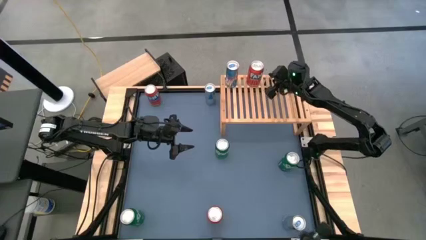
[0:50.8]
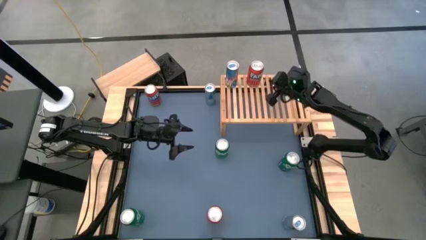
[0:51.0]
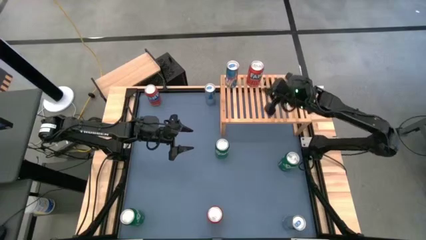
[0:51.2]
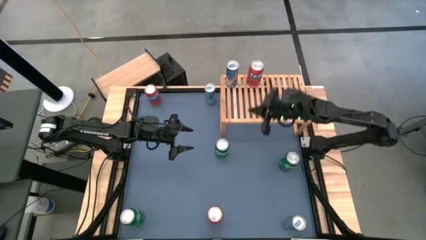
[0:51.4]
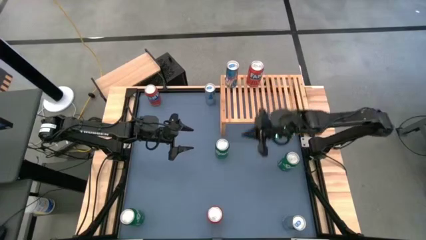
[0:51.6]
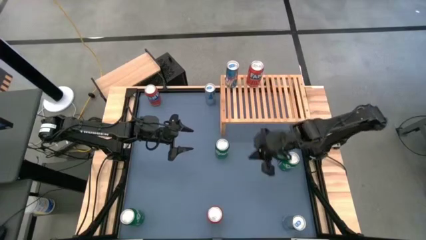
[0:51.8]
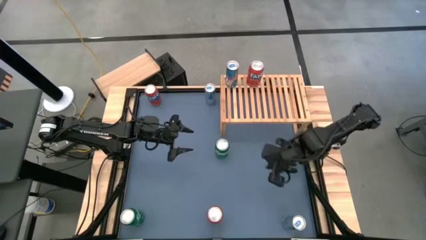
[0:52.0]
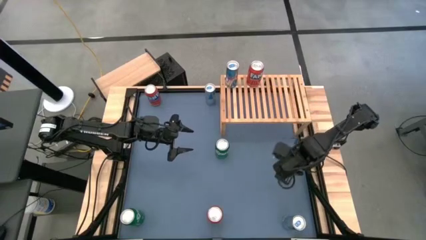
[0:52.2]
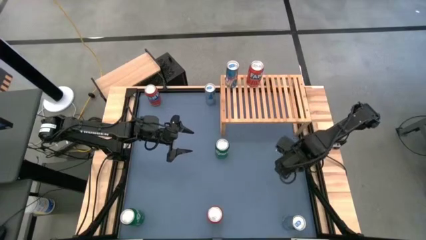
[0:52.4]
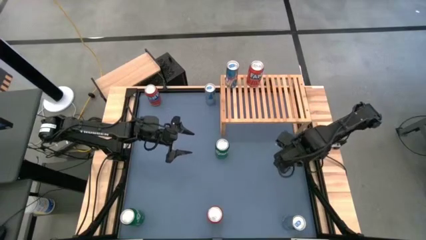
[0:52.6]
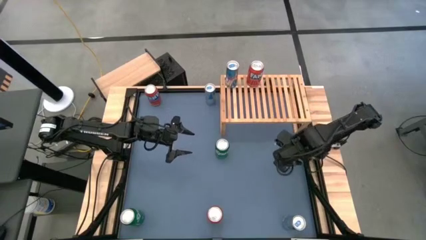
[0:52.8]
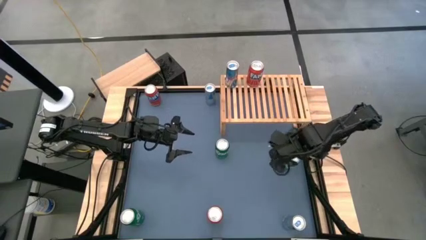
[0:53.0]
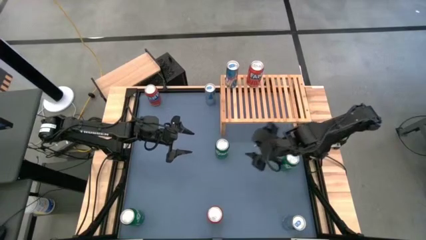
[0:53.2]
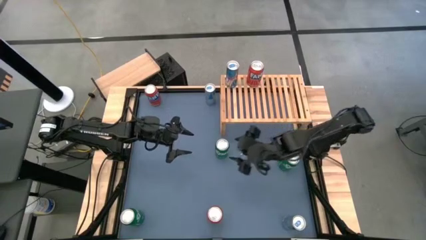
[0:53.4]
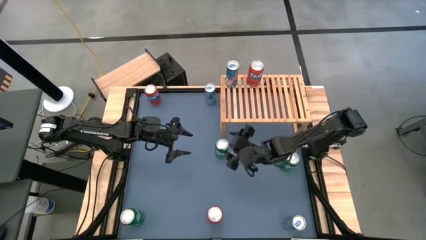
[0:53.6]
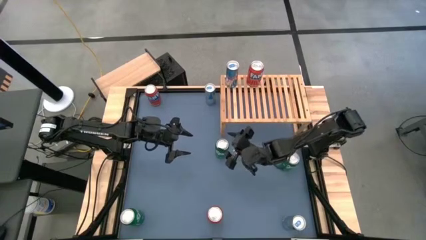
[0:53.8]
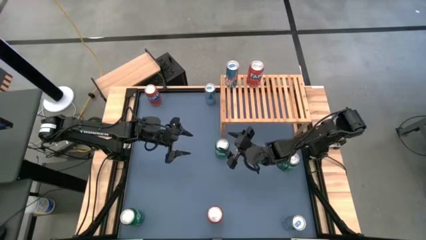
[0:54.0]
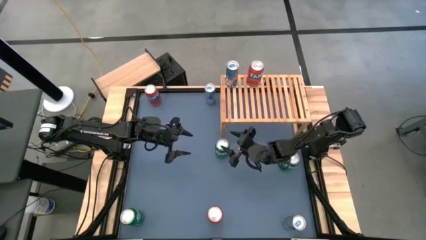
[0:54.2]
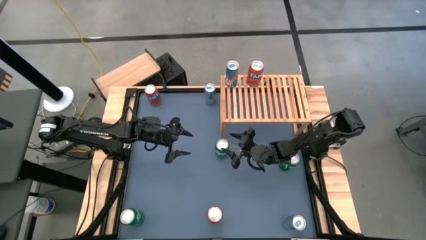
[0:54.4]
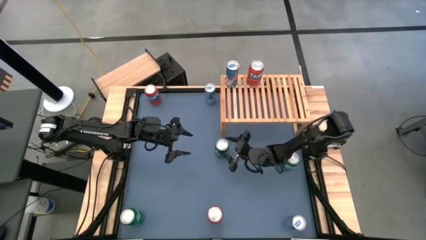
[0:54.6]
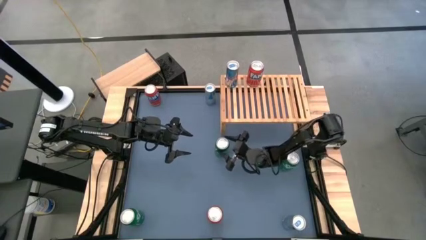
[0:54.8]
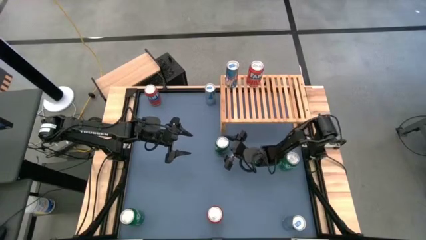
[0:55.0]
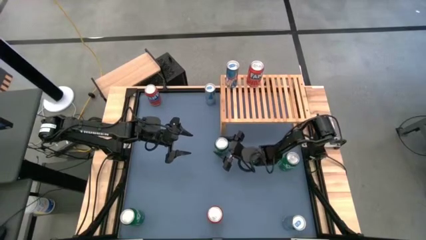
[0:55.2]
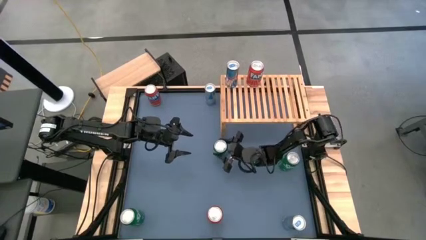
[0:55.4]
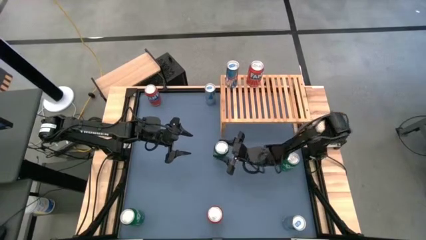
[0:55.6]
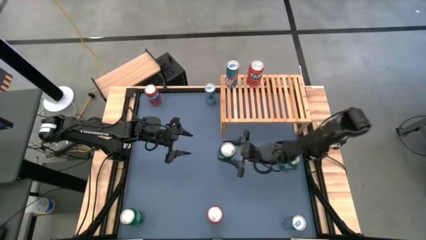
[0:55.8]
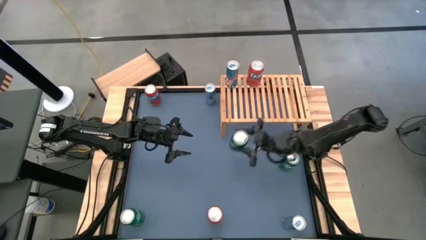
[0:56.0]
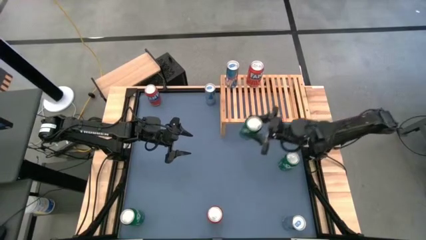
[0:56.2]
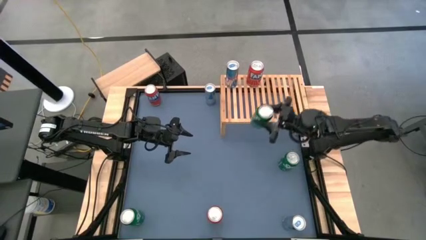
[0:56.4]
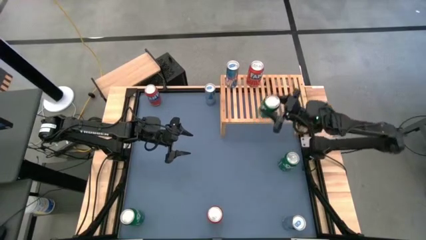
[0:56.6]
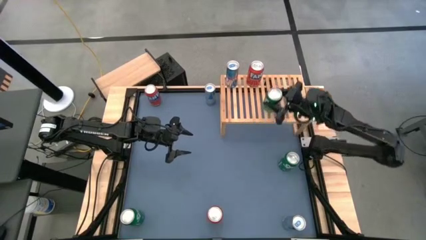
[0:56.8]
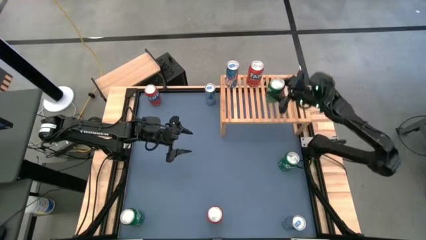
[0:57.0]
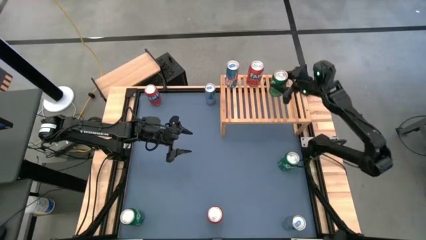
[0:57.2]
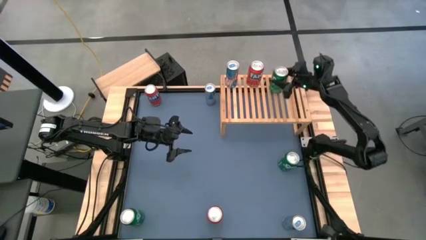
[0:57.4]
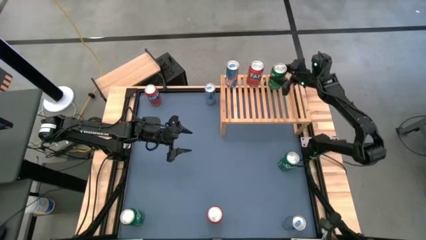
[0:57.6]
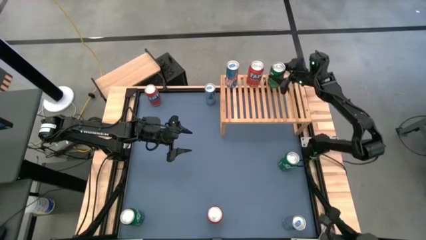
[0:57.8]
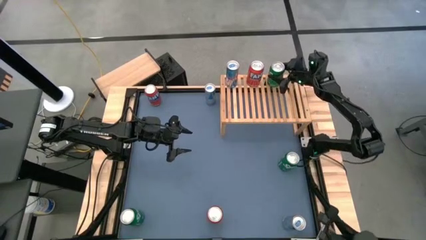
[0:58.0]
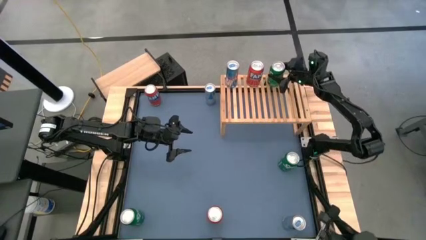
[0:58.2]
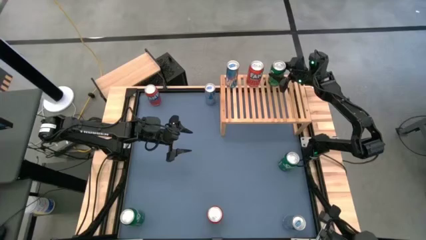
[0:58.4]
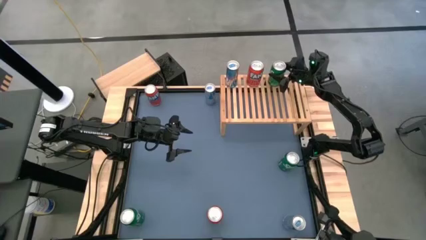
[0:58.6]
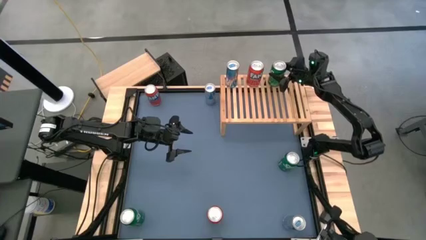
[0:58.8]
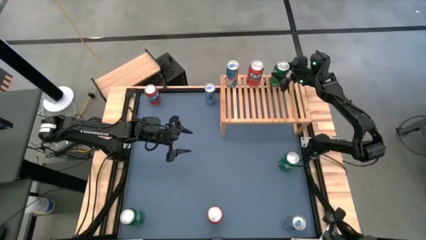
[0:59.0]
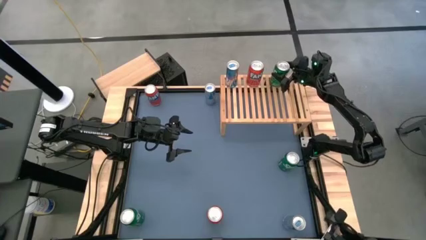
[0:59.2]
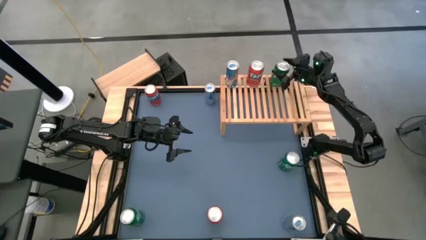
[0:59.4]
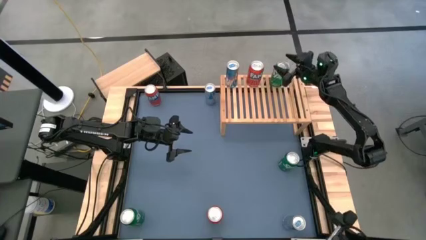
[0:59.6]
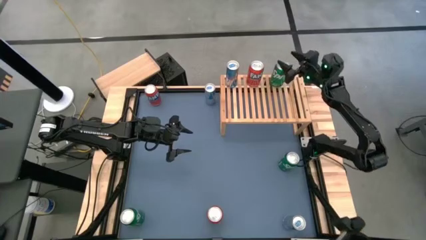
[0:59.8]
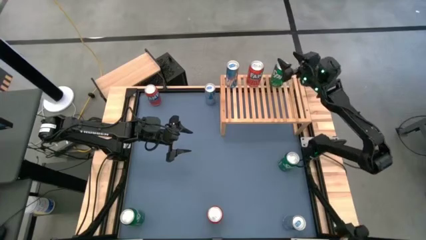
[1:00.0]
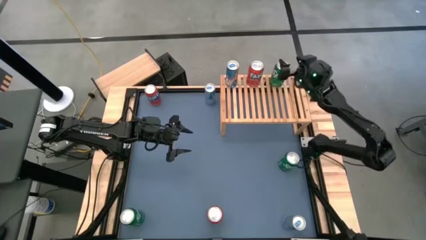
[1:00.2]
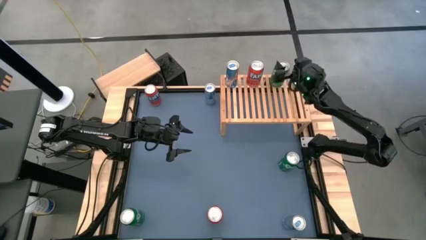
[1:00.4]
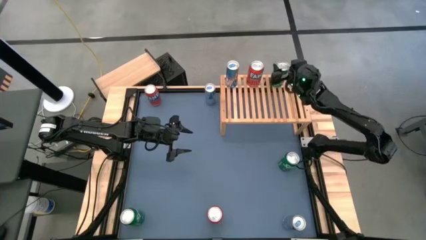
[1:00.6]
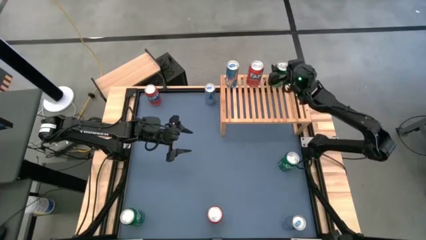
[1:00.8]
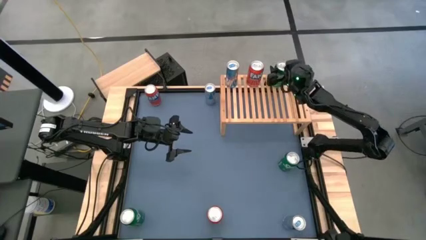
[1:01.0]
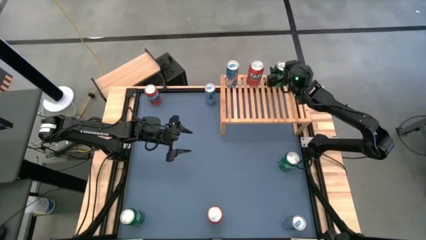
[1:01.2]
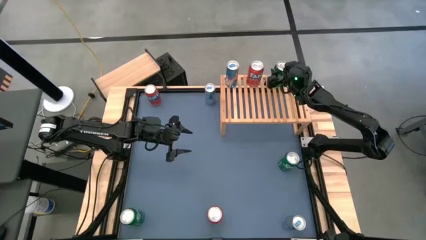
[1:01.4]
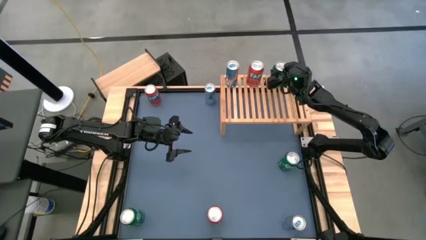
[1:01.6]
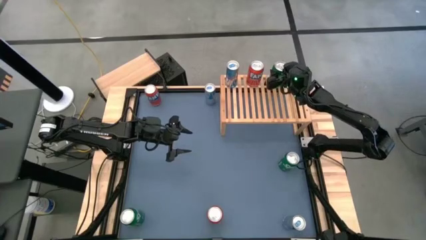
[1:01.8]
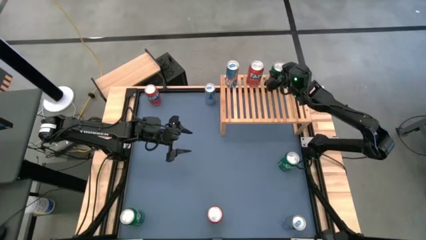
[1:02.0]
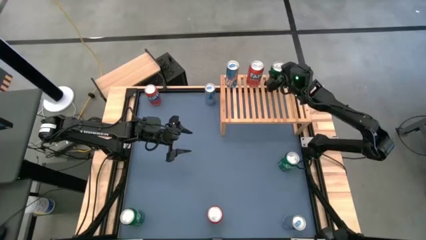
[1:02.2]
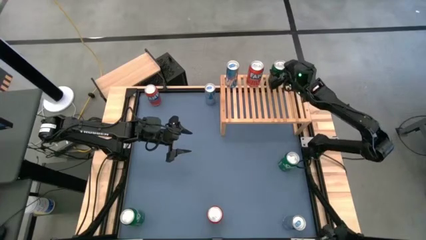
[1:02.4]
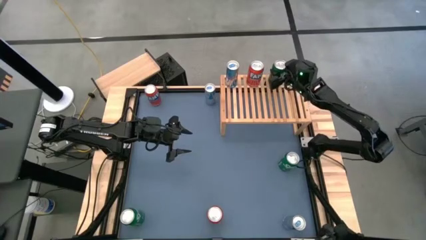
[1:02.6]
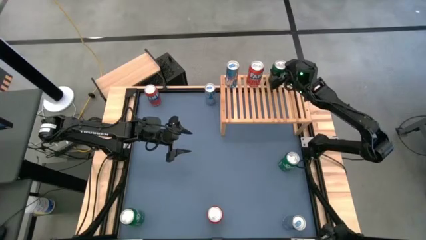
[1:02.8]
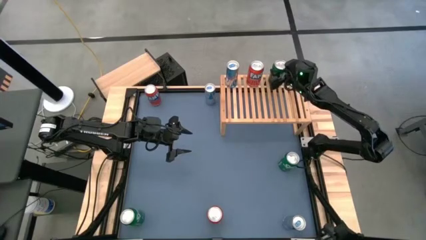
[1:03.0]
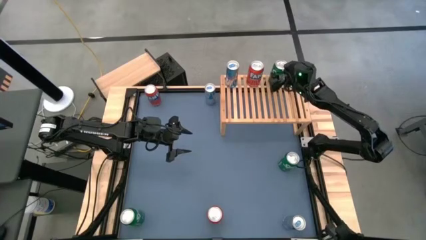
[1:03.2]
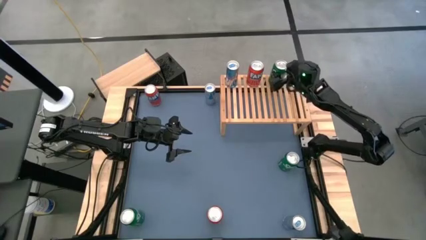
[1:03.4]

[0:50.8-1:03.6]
Task: Place canned beverage on shelf
Put the middle green soda can on the shelf
